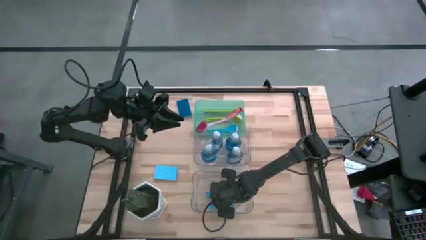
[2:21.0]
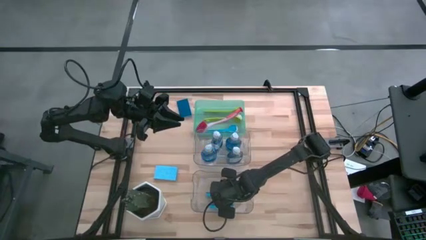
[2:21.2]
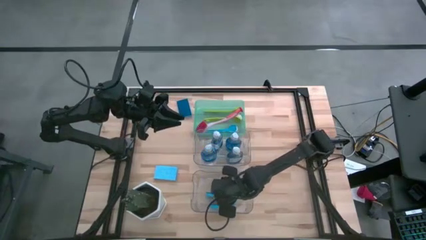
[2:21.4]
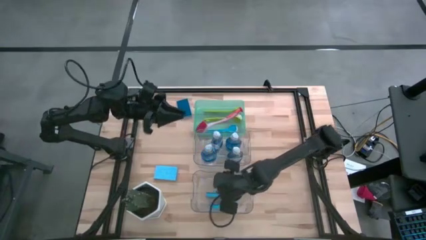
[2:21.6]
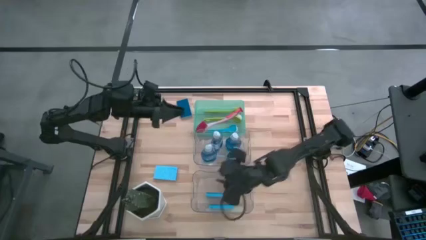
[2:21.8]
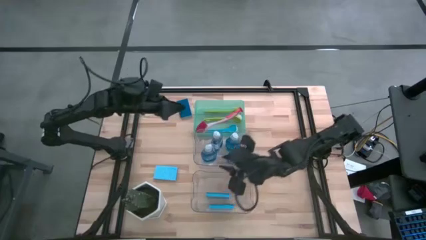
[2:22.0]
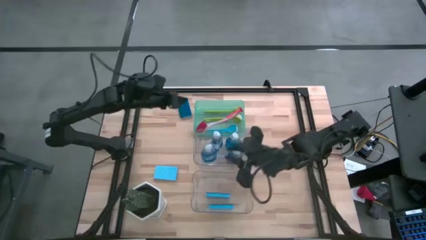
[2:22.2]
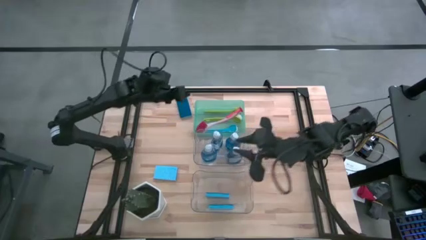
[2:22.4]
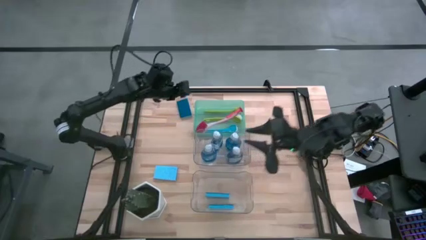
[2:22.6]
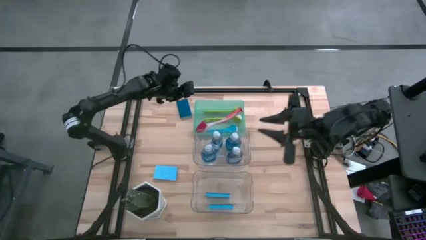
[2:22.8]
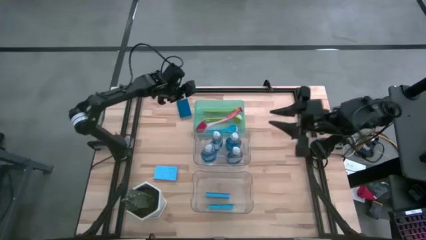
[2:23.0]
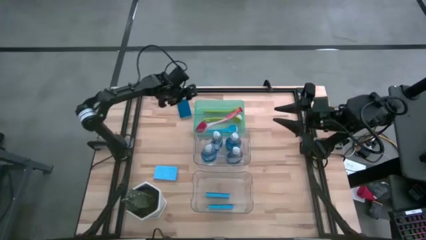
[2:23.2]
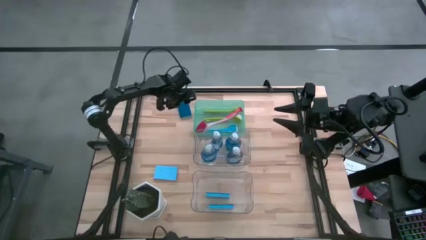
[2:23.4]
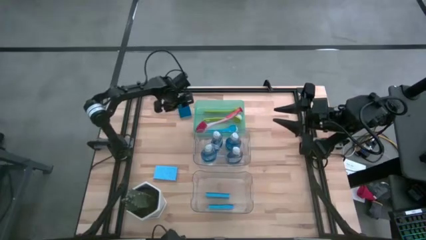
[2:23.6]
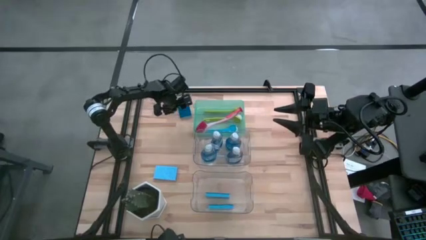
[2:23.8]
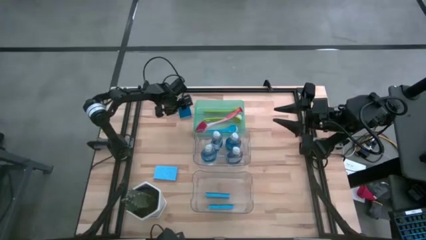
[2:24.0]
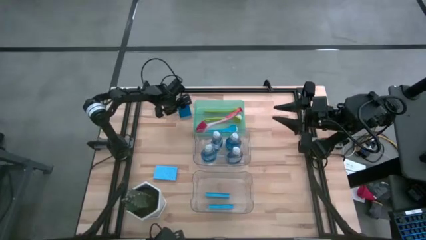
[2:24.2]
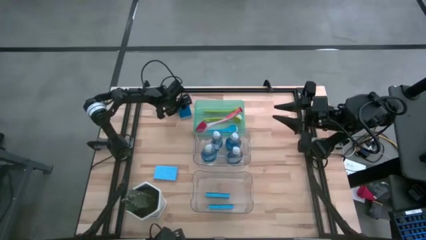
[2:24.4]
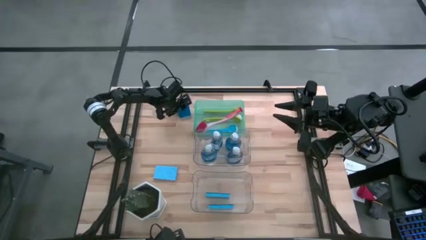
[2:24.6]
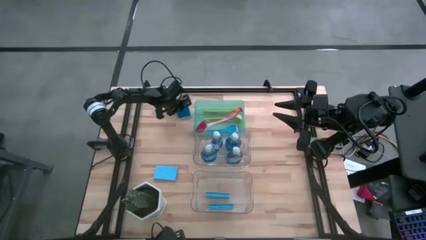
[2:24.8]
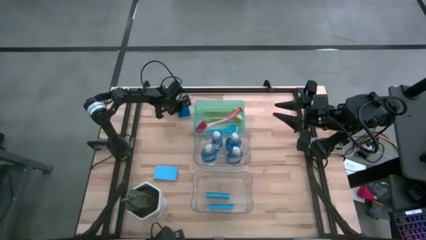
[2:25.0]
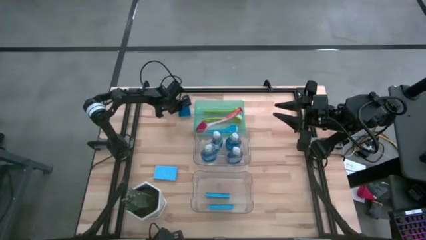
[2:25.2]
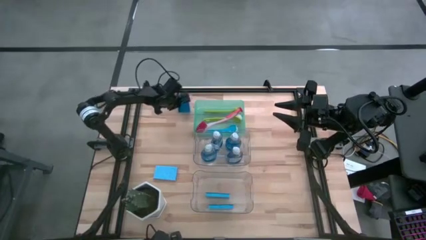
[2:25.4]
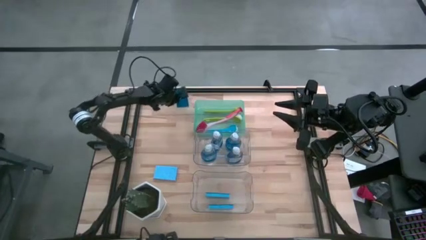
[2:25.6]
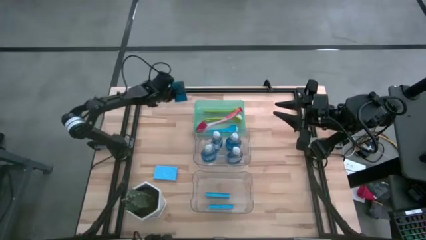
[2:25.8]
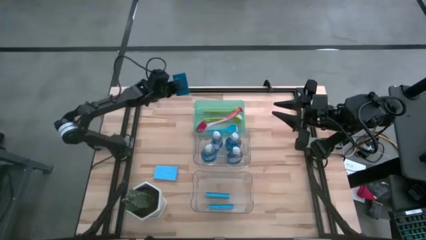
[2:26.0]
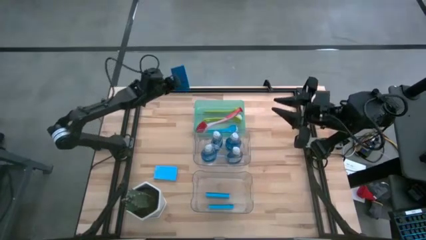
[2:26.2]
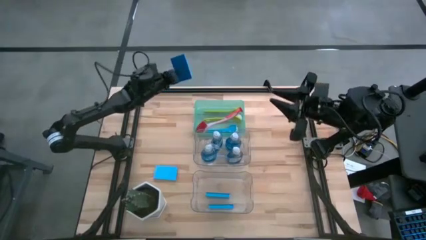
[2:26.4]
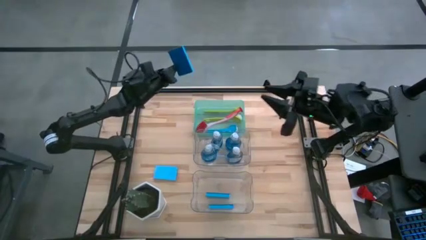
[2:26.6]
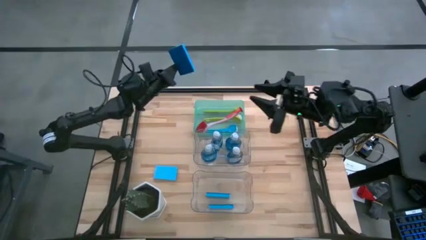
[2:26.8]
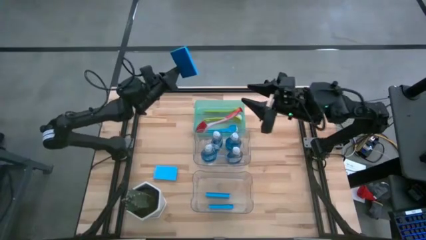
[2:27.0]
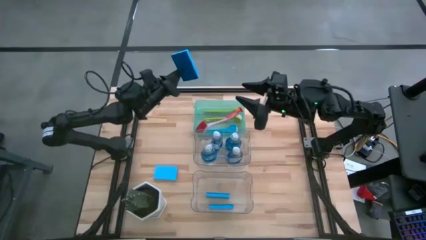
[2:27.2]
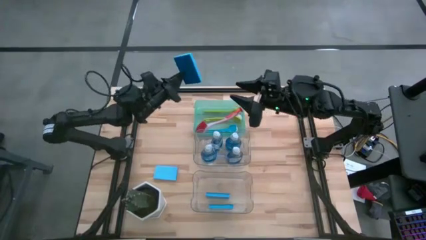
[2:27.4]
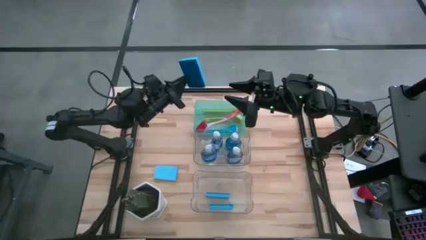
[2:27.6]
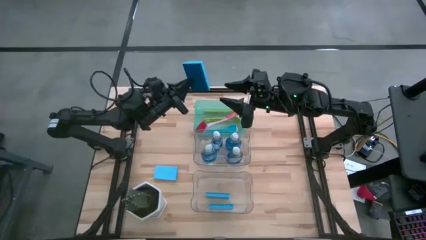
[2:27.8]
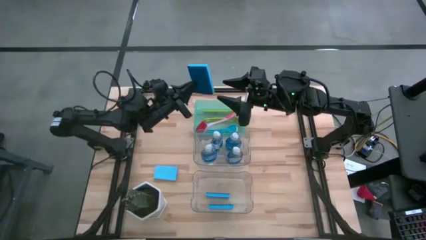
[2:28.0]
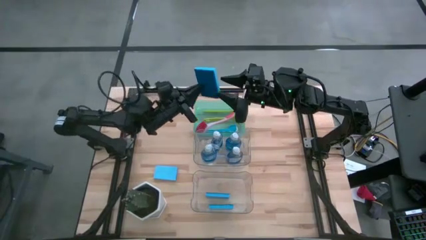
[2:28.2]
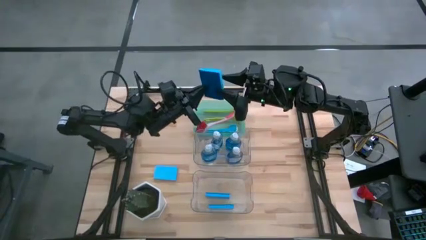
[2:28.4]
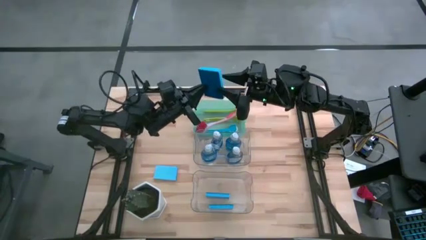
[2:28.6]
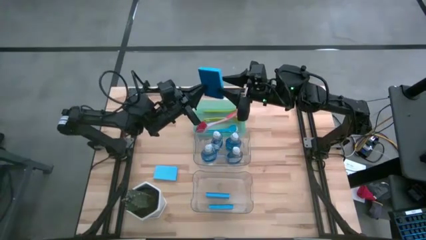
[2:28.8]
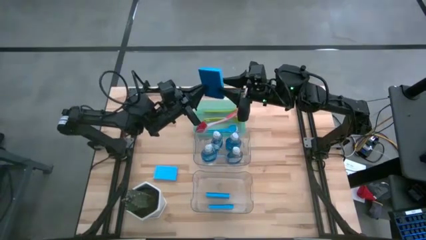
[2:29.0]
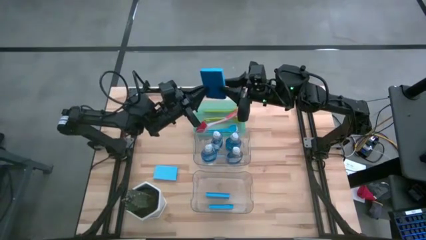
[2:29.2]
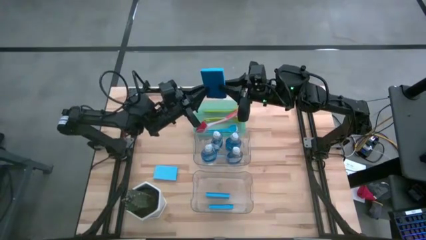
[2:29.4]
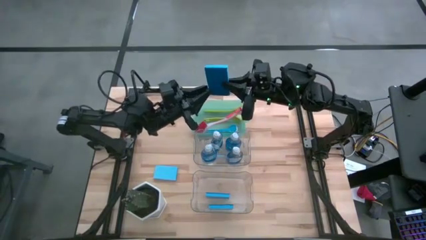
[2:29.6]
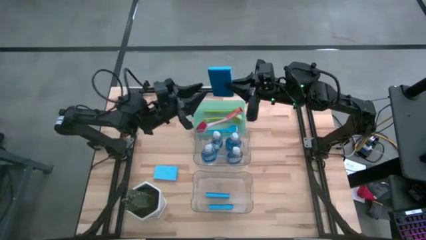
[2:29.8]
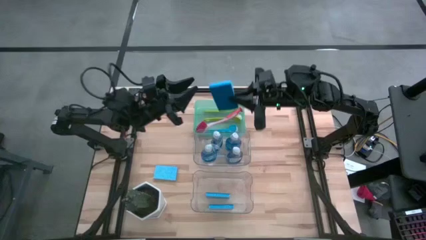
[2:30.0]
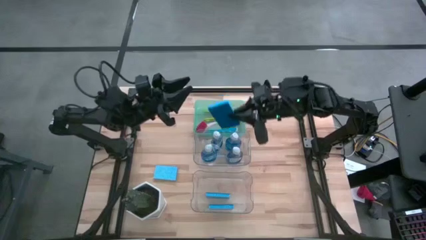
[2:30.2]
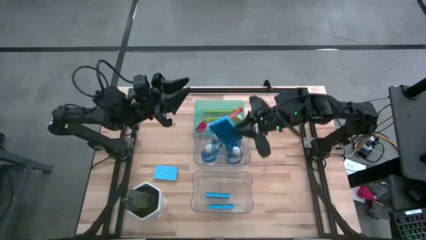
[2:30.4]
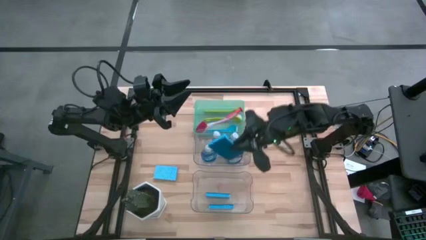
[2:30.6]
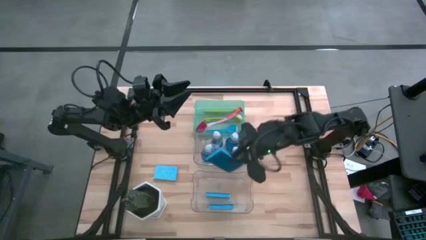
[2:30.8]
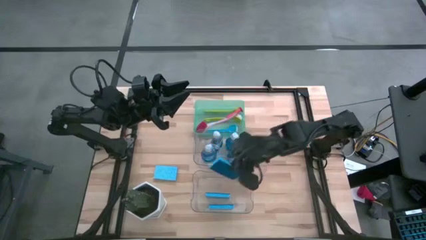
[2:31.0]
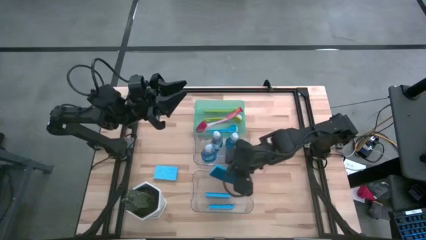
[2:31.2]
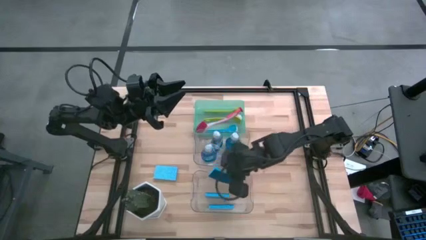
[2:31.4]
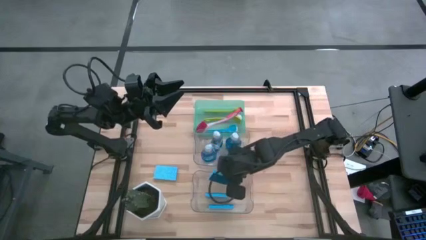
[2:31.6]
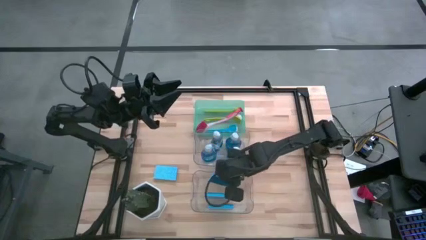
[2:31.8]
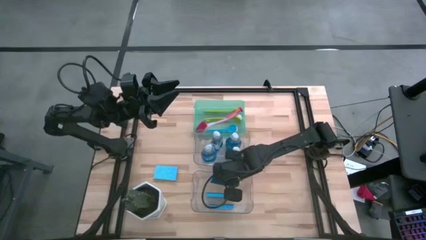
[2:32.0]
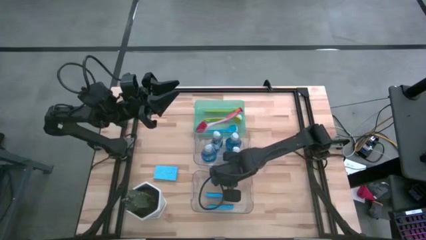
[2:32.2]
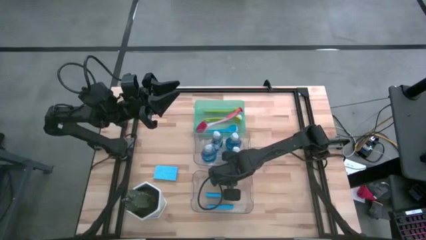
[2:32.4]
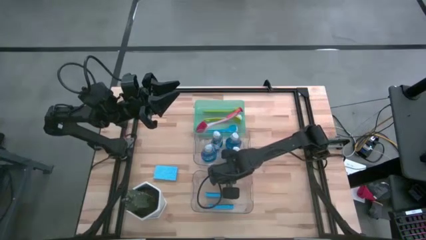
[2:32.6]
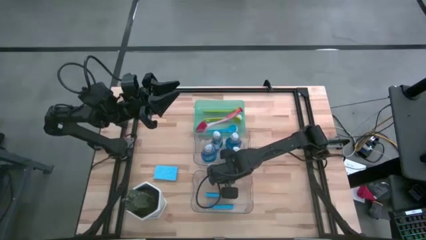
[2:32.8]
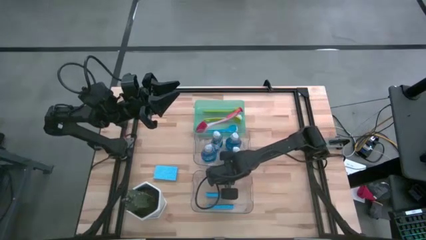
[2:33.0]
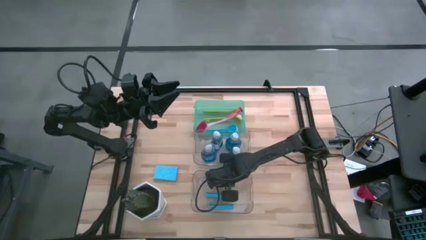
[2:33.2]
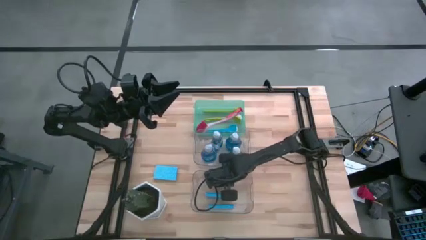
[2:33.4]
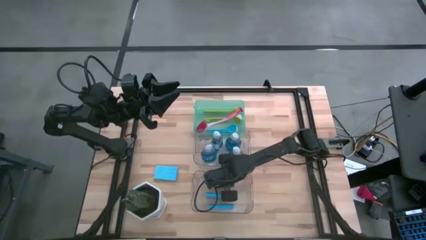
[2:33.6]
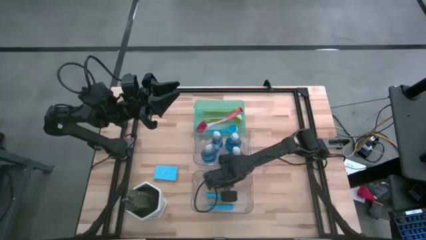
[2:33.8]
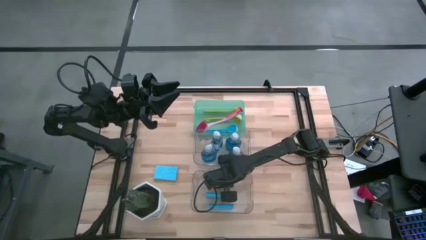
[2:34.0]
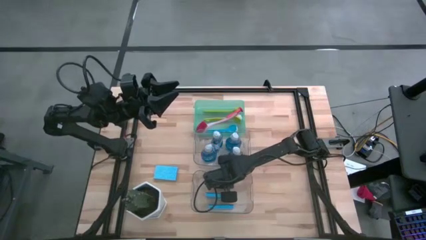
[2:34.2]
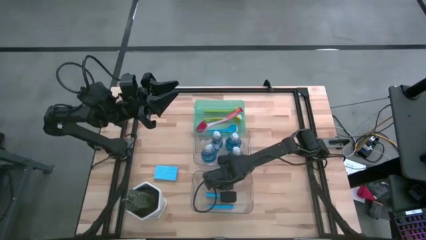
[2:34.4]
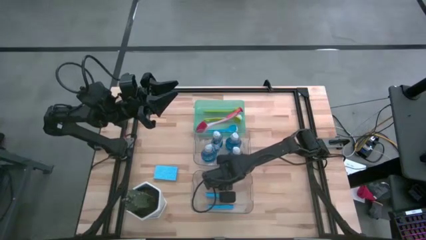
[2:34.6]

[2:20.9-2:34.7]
Task: Pick & Place Kitchen Sink Supplies
Put the blue sponge into the bottom transparent bin

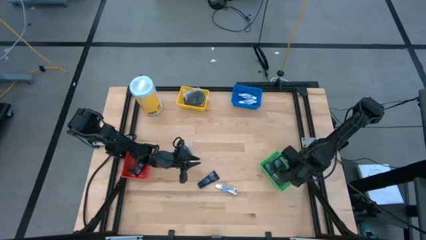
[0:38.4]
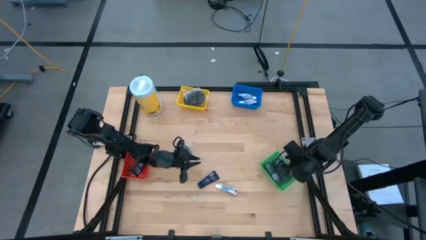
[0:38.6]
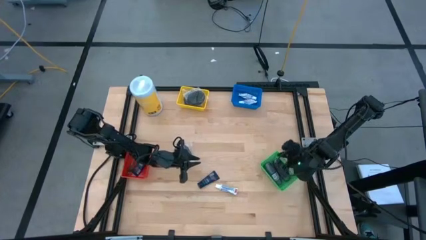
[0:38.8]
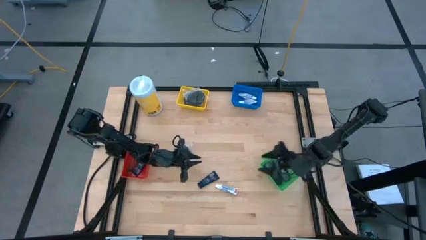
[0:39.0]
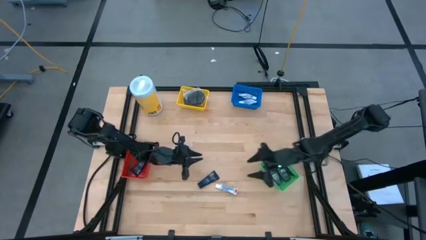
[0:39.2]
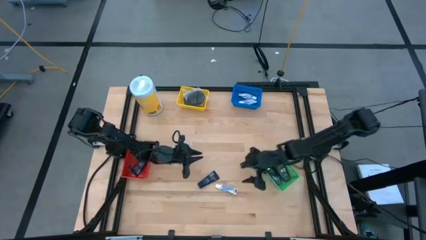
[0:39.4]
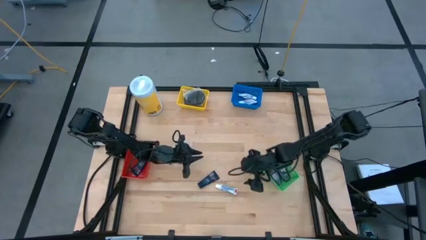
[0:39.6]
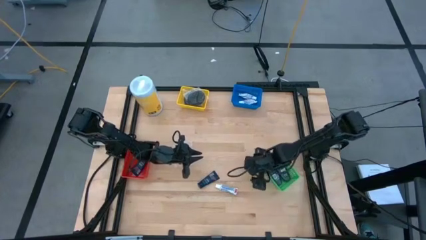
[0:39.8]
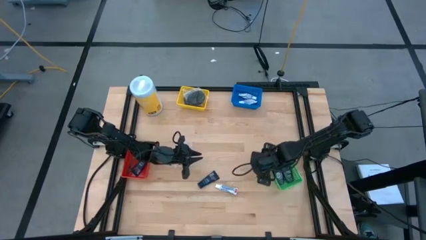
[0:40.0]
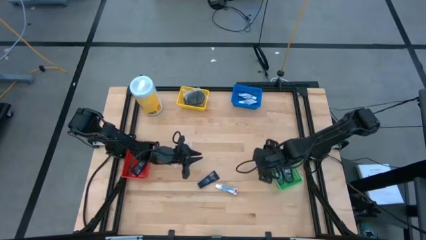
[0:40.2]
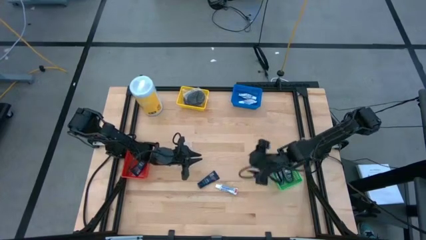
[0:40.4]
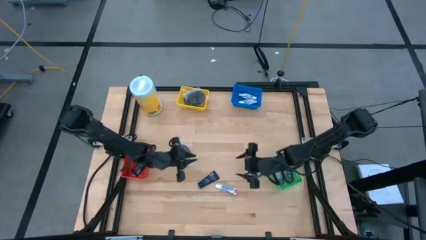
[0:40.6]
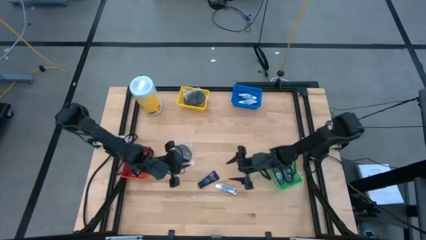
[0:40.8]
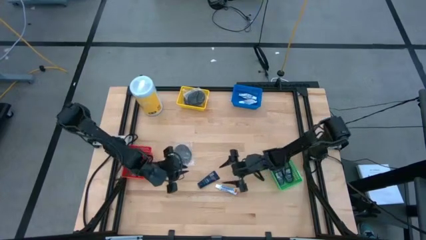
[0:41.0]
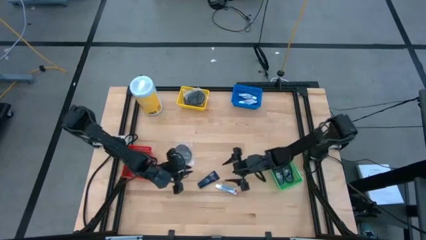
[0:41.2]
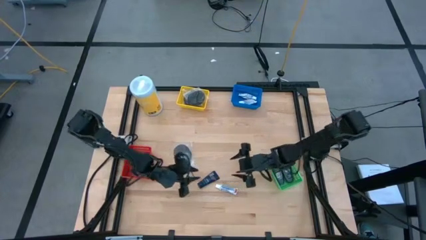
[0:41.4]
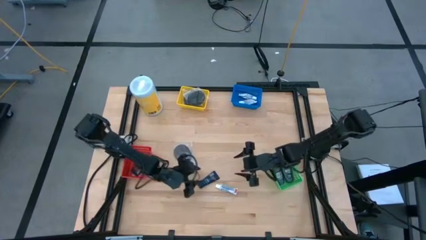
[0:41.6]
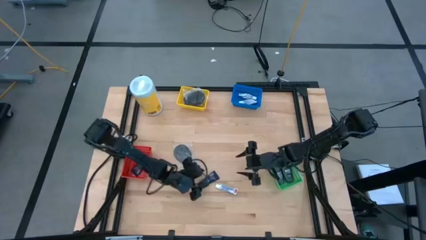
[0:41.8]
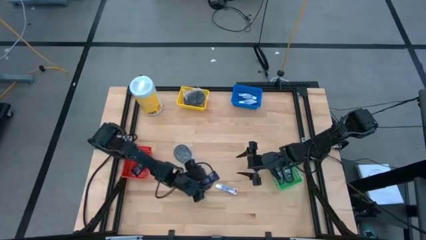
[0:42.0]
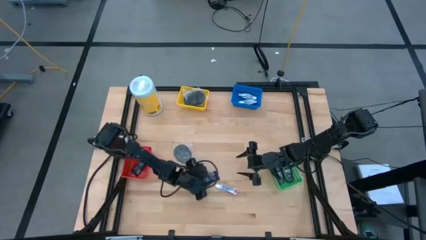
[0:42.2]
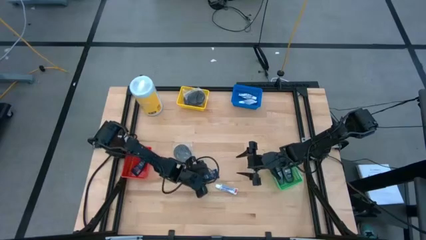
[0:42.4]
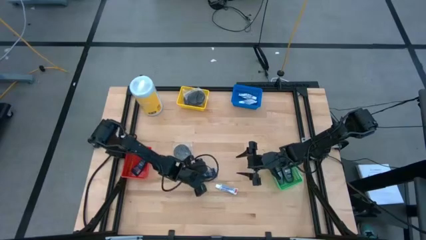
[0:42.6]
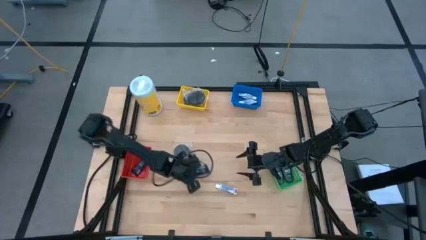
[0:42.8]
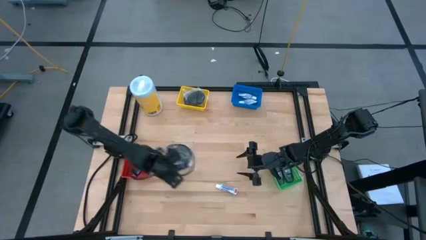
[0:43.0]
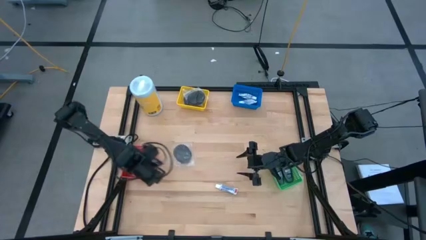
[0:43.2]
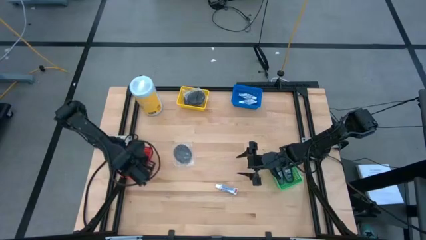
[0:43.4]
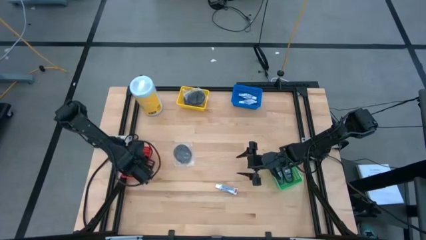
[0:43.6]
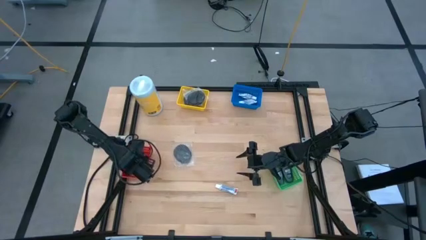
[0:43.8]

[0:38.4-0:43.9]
Task: Pick & Place Travel size toiletries
Put the blue shaving cream into the red bin
